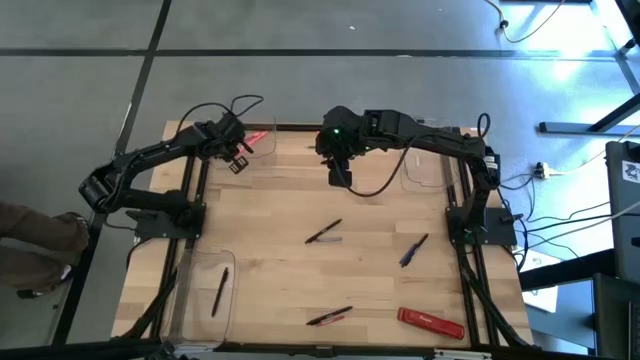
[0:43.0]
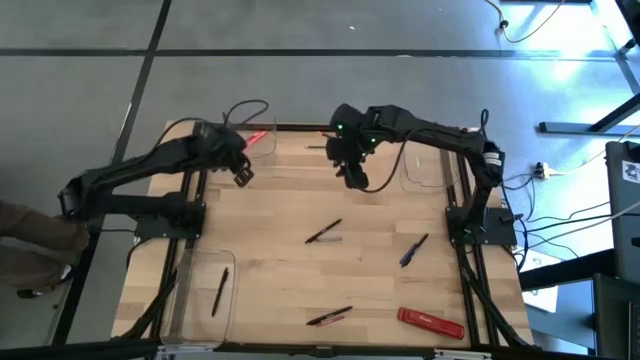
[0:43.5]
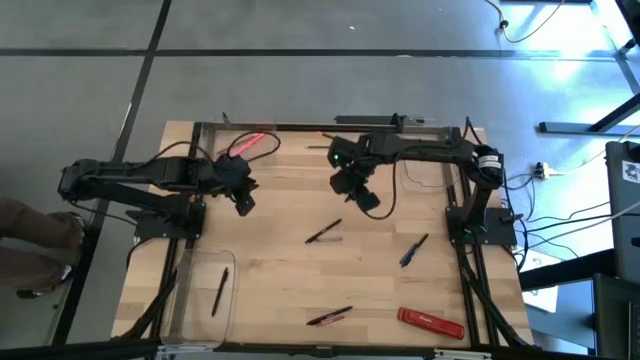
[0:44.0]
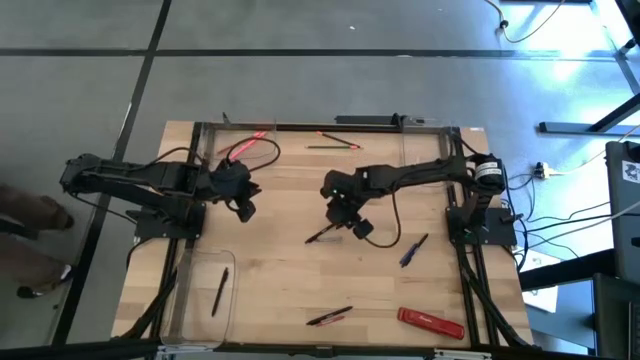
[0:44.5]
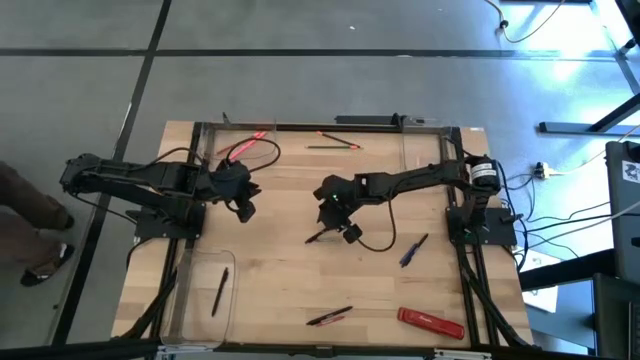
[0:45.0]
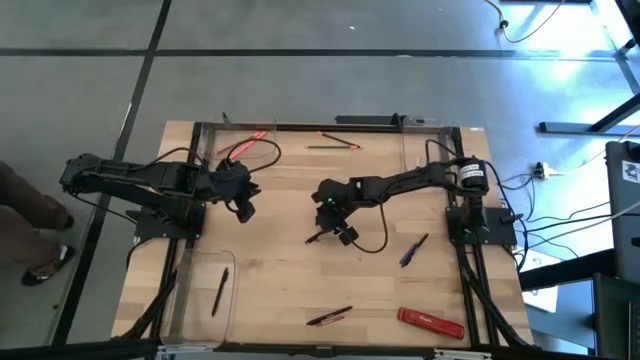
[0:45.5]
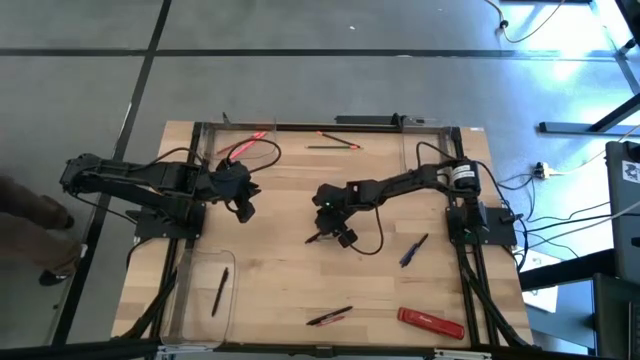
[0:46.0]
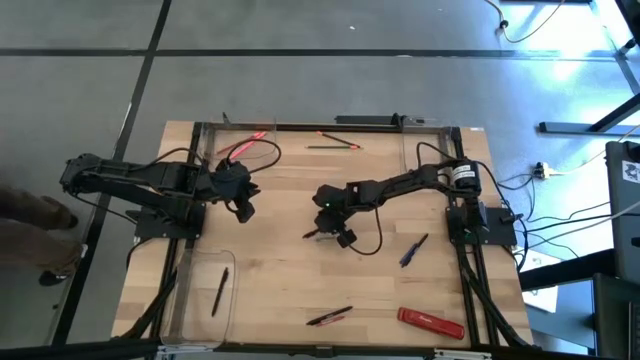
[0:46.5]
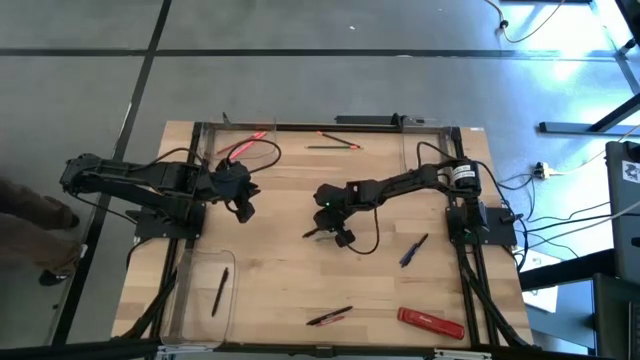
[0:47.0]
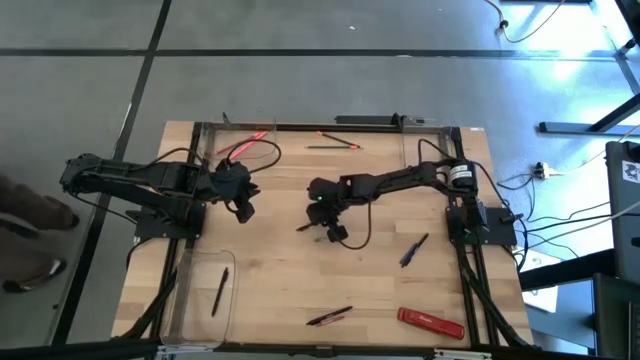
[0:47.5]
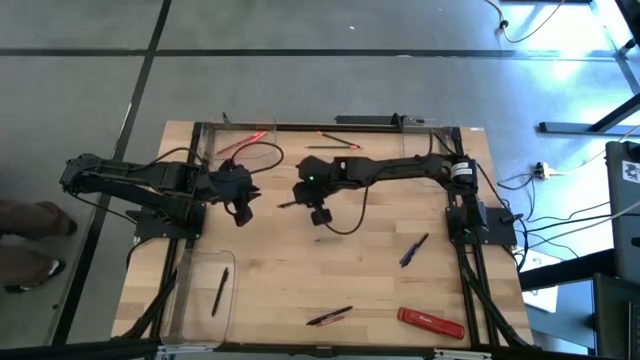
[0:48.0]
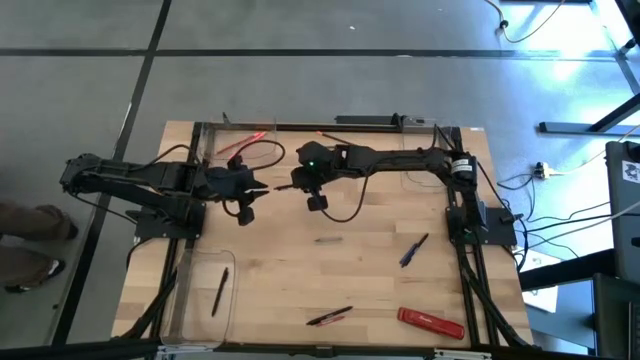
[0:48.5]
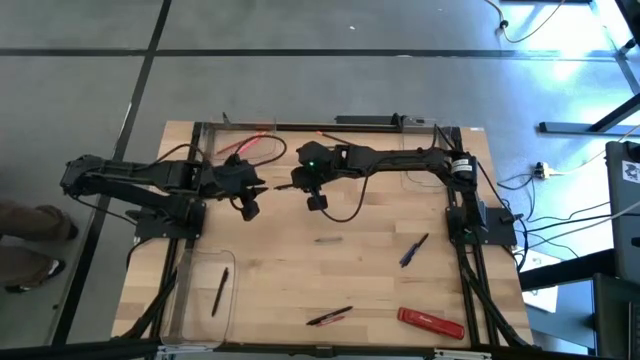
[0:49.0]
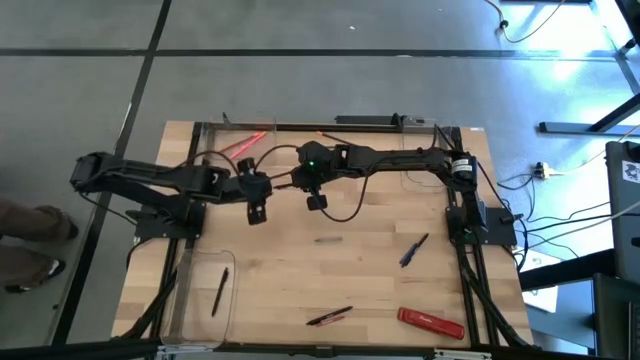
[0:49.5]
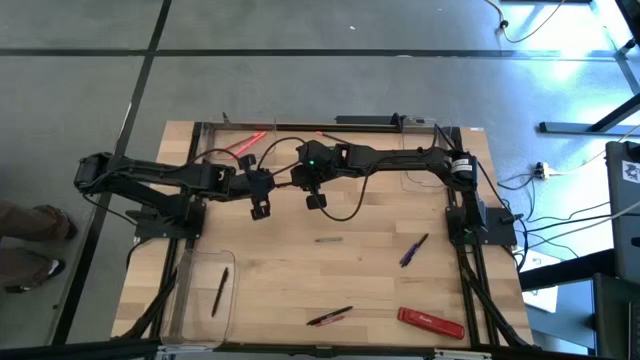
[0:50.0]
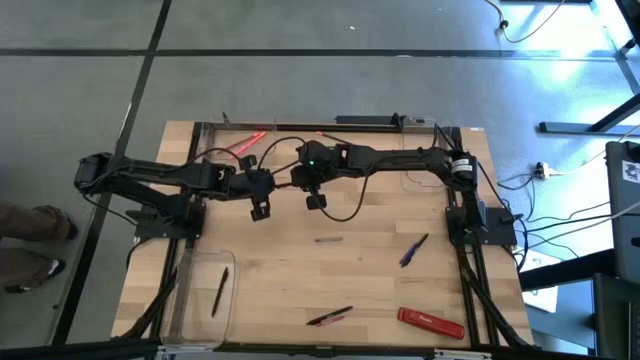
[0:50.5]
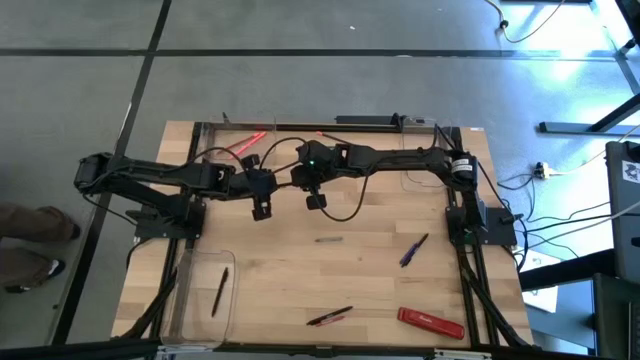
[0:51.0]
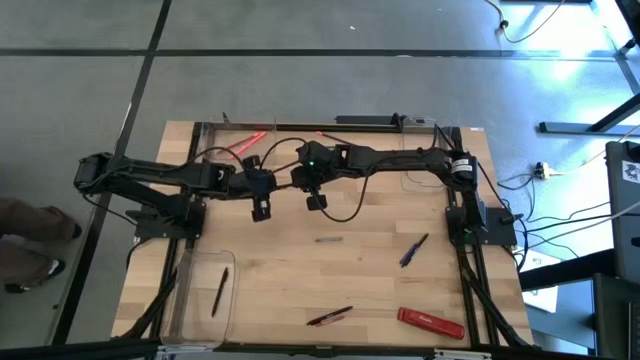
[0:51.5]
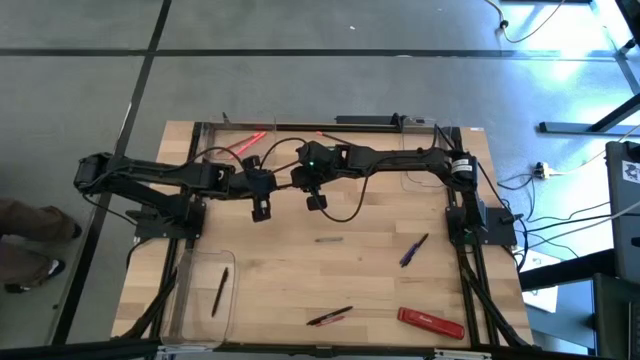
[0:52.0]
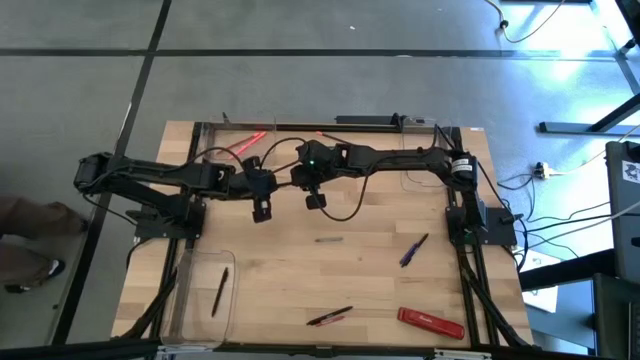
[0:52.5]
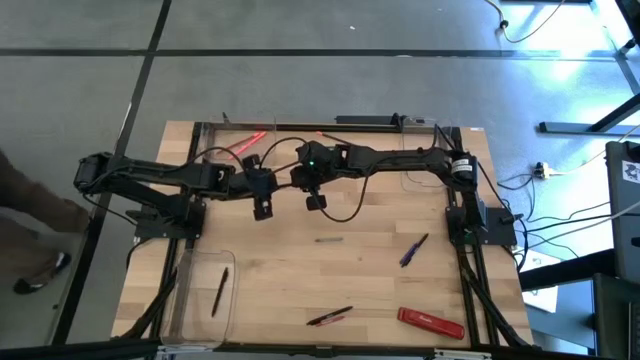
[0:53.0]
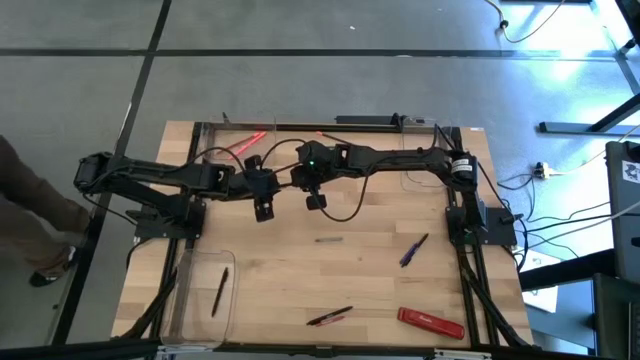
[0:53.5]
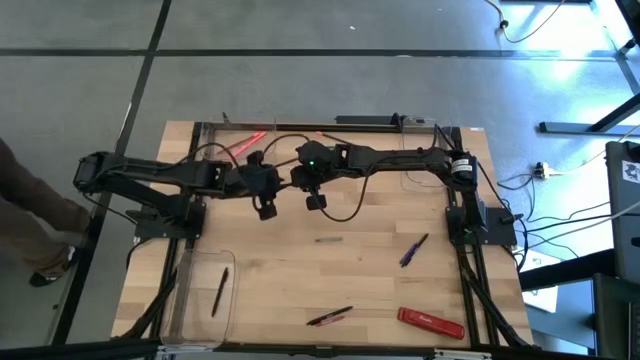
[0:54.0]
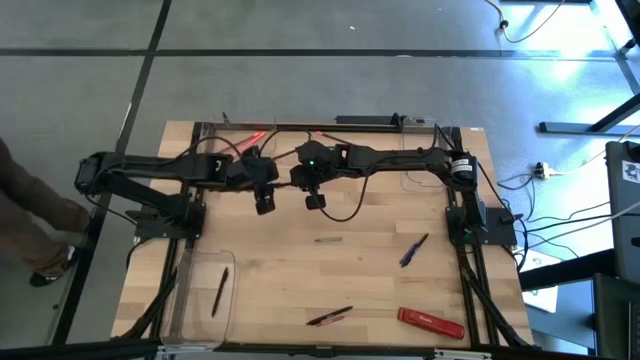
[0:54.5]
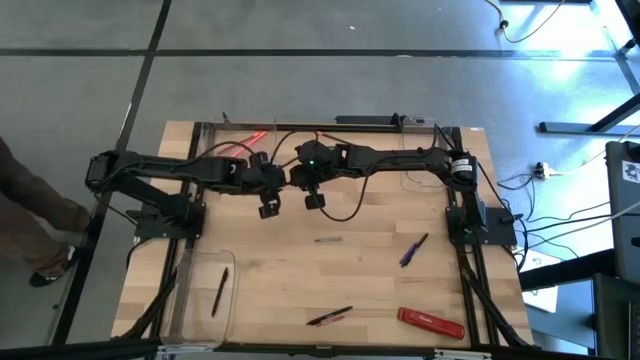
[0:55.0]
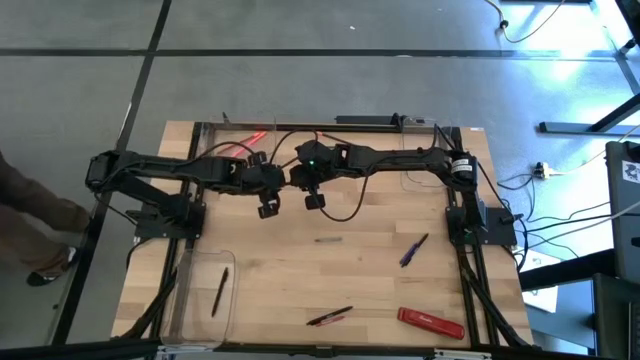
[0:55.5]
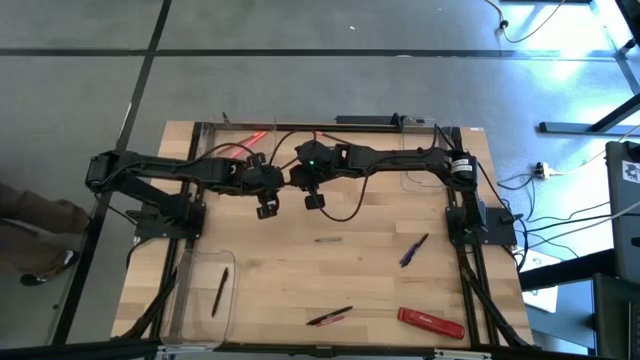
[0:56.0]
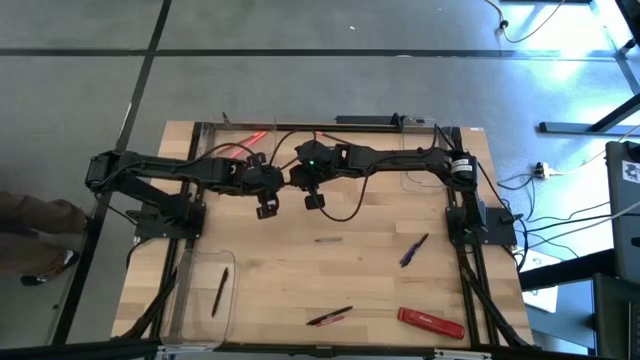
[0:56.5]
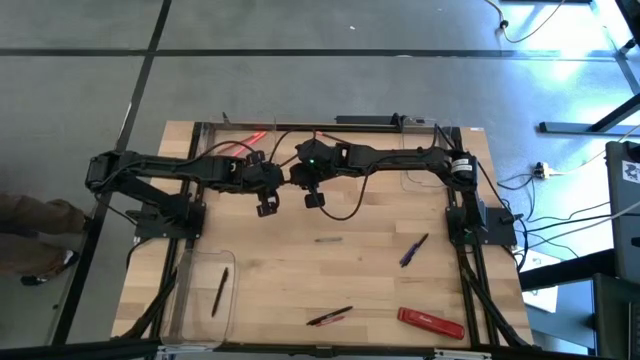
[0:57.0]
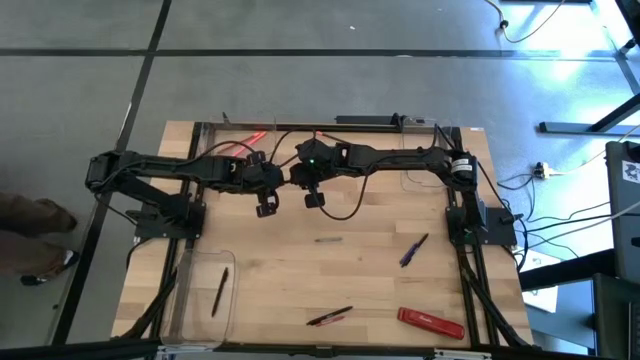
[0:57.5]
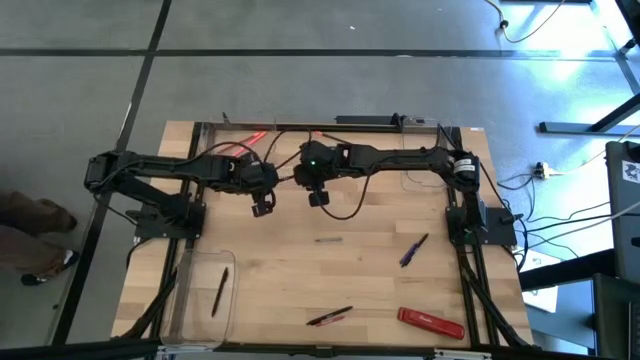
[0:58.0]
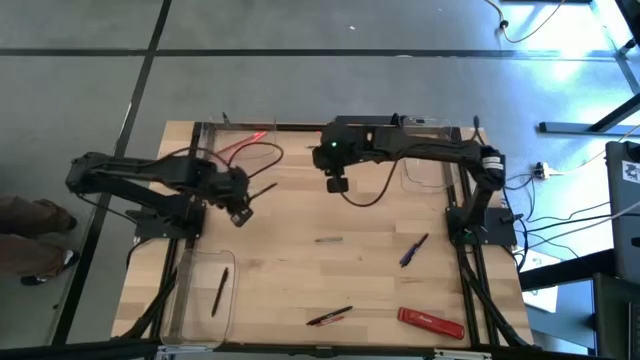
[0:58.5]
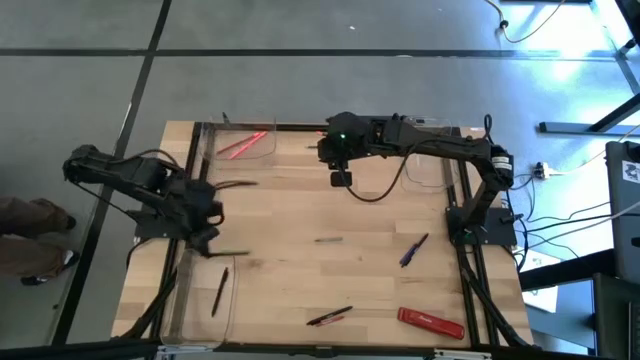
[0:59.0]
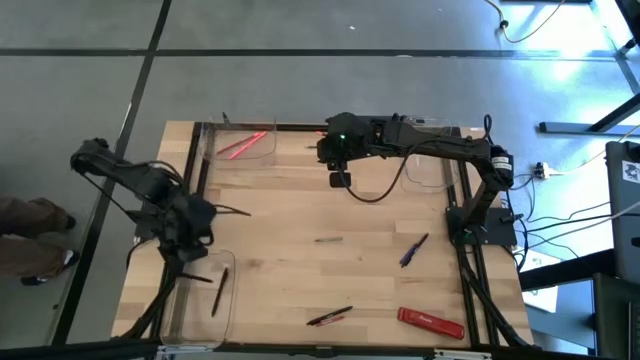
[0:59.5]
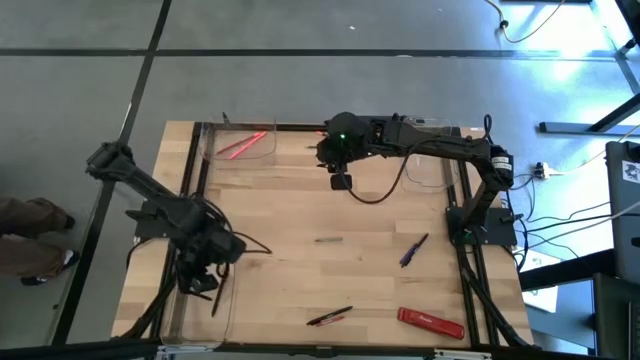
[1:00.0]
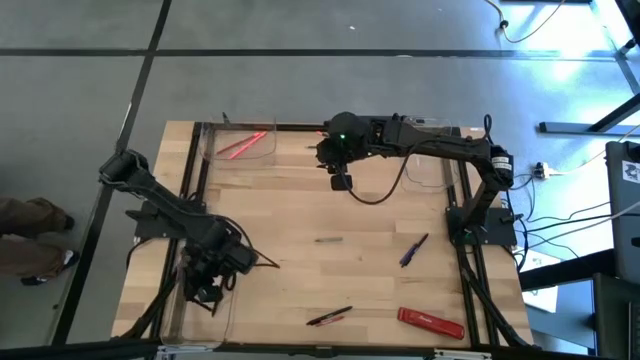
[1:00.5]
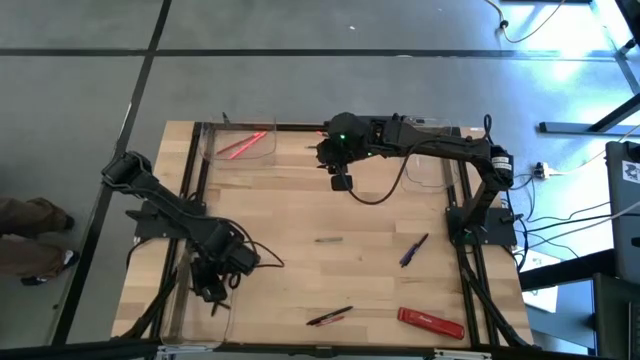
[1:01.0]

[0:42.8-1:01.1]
Task: Sort crayons/erasers/pens/pencils in bins
Put the left black pen into the bottom left transparent bin
